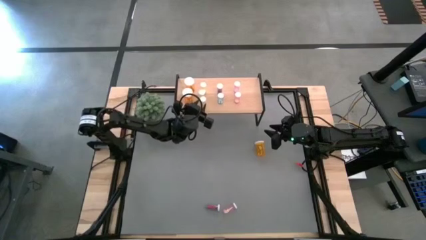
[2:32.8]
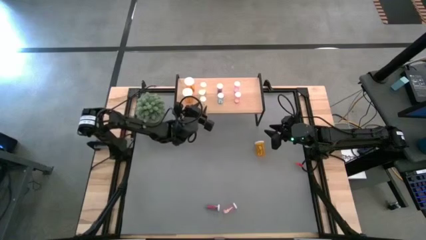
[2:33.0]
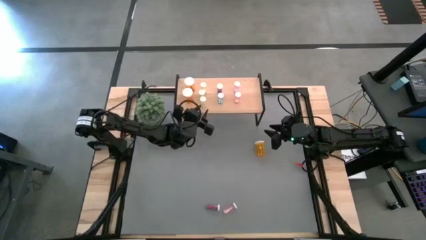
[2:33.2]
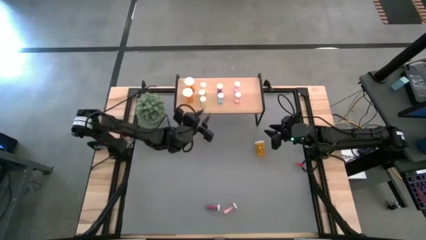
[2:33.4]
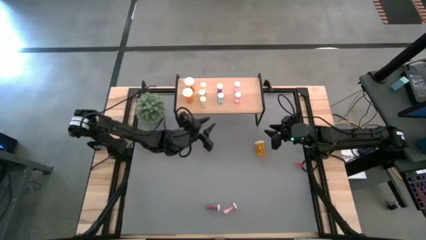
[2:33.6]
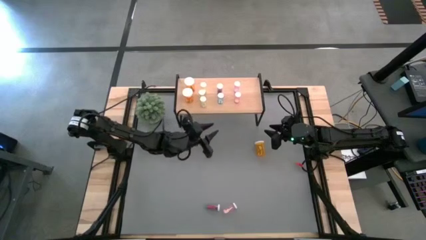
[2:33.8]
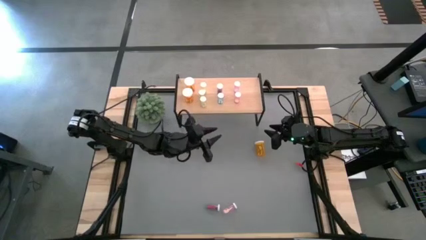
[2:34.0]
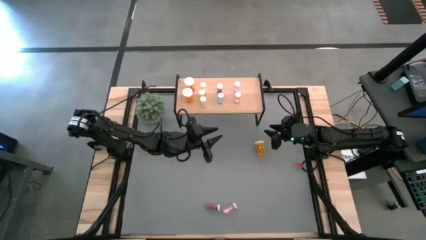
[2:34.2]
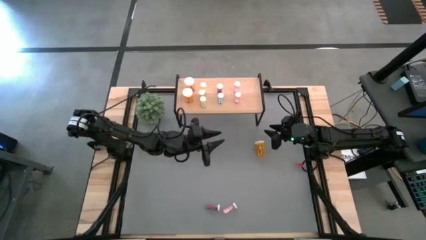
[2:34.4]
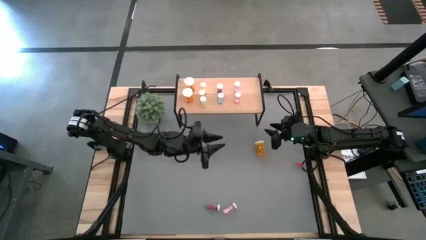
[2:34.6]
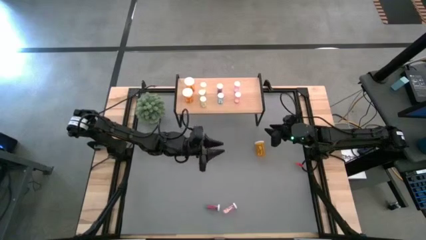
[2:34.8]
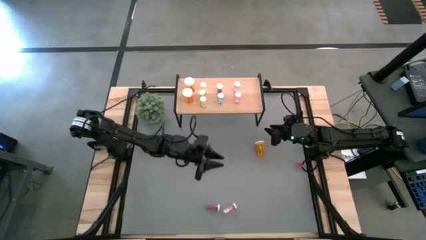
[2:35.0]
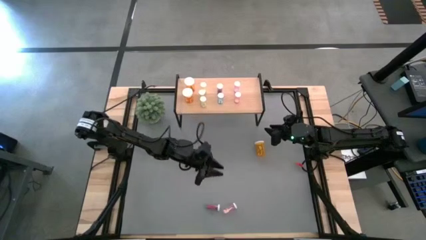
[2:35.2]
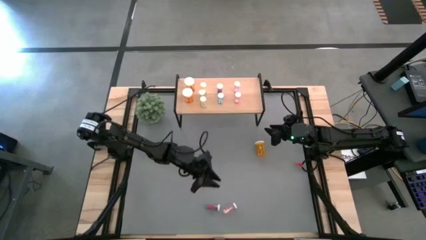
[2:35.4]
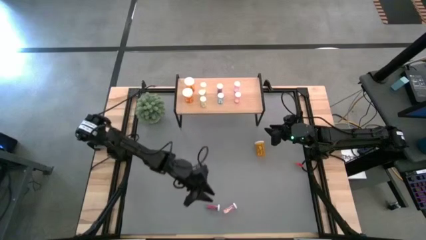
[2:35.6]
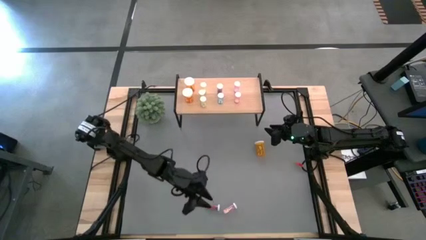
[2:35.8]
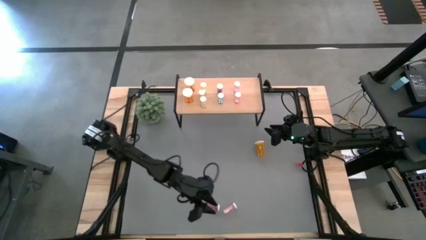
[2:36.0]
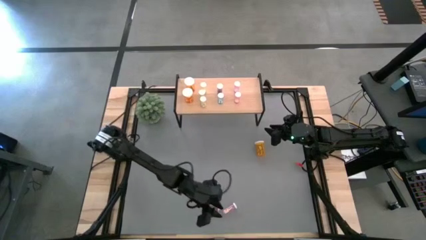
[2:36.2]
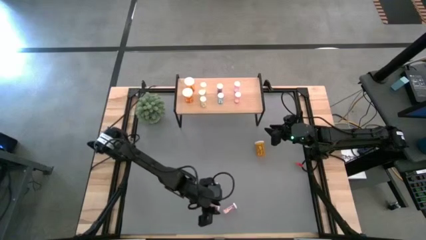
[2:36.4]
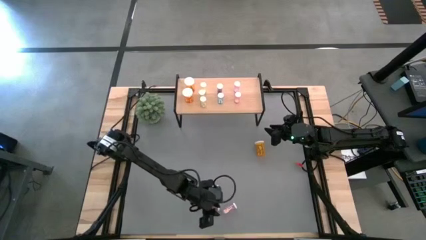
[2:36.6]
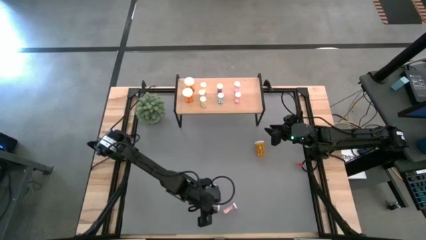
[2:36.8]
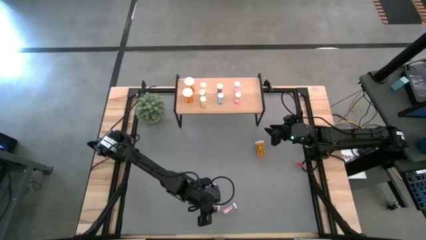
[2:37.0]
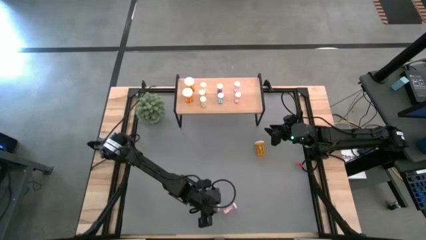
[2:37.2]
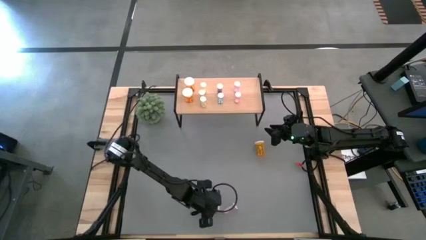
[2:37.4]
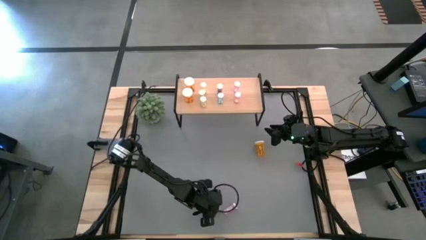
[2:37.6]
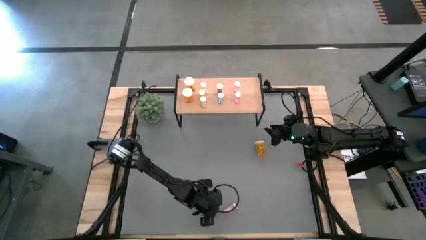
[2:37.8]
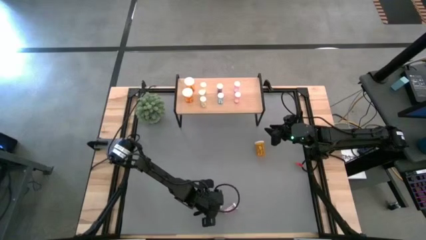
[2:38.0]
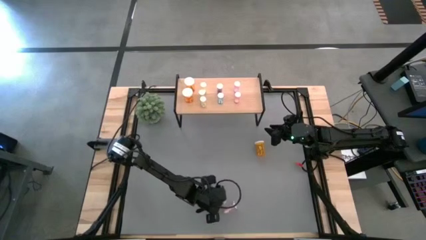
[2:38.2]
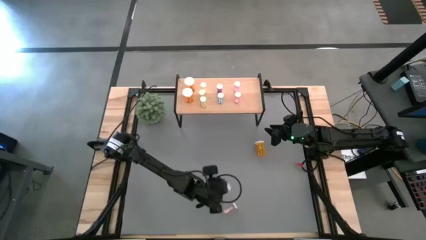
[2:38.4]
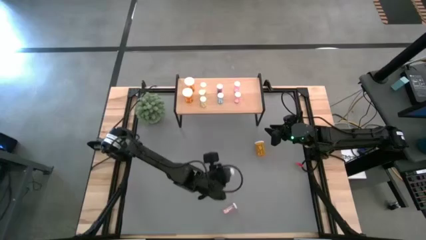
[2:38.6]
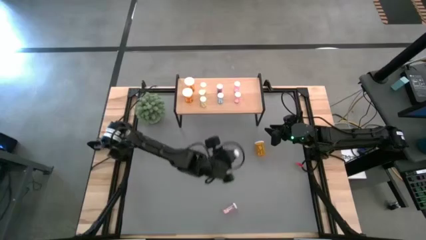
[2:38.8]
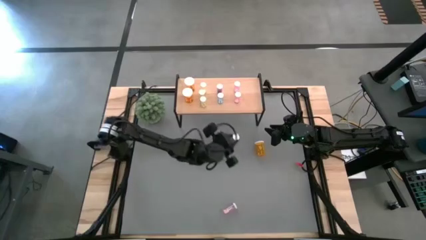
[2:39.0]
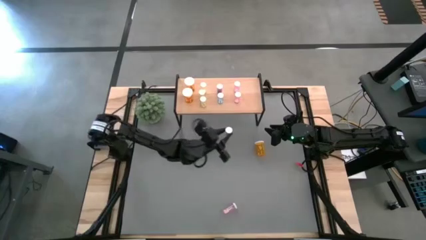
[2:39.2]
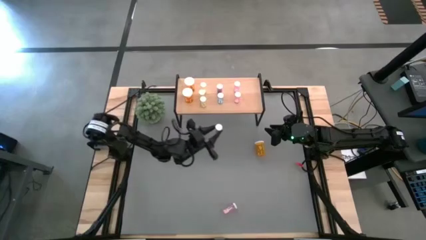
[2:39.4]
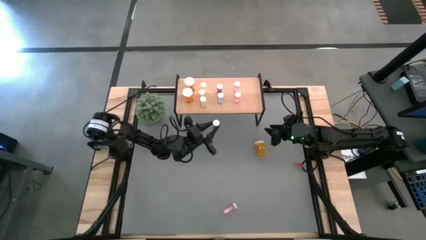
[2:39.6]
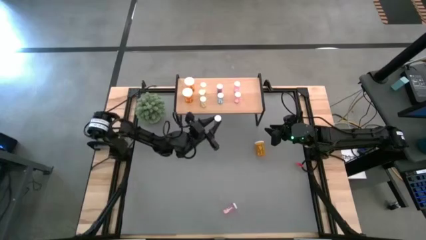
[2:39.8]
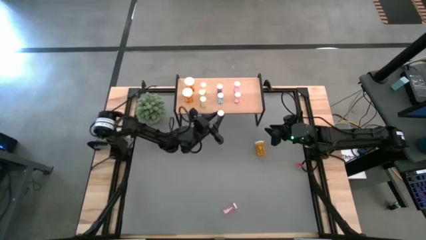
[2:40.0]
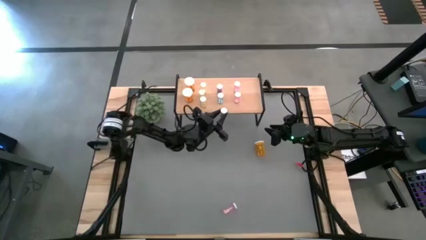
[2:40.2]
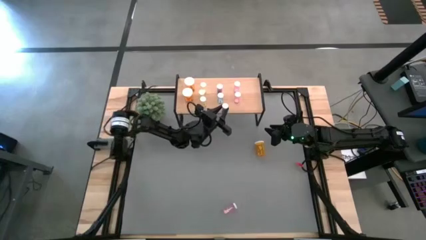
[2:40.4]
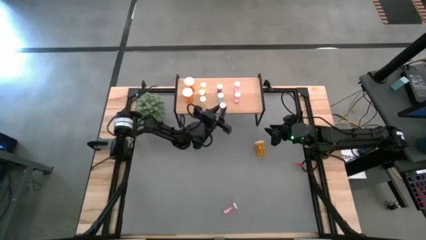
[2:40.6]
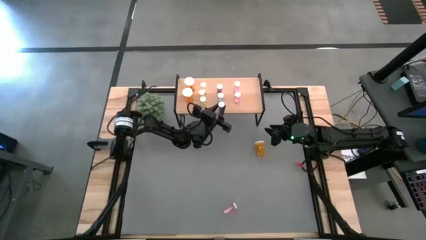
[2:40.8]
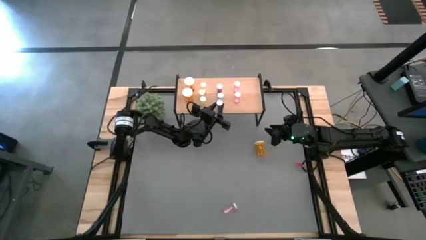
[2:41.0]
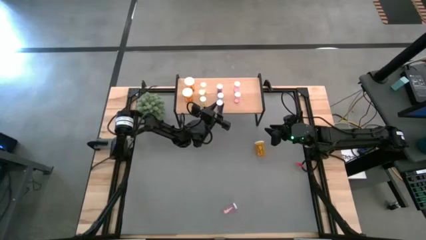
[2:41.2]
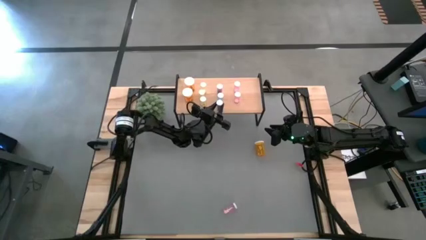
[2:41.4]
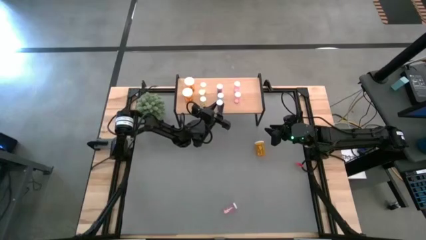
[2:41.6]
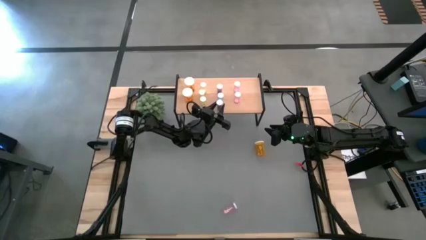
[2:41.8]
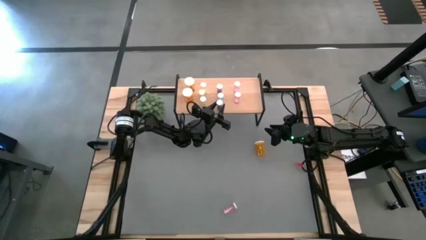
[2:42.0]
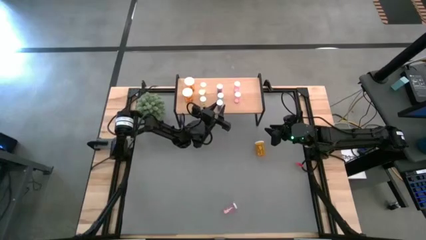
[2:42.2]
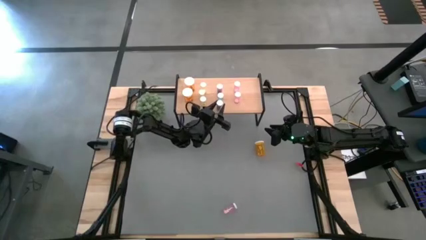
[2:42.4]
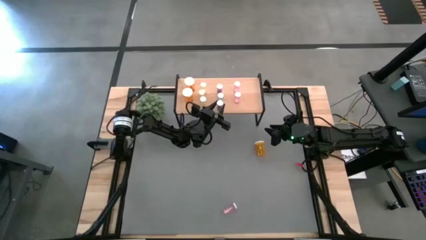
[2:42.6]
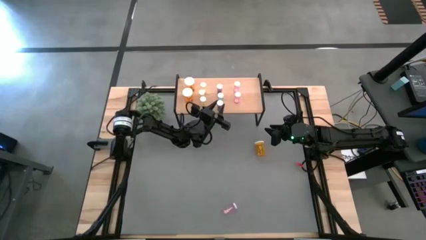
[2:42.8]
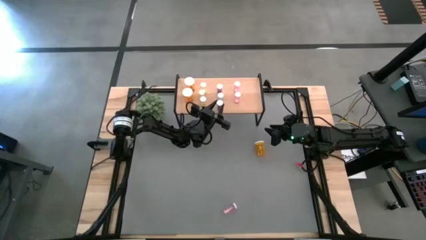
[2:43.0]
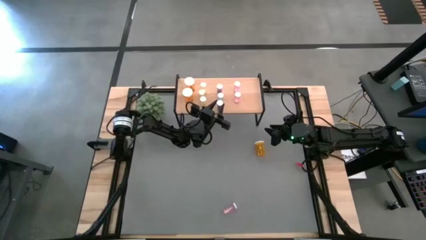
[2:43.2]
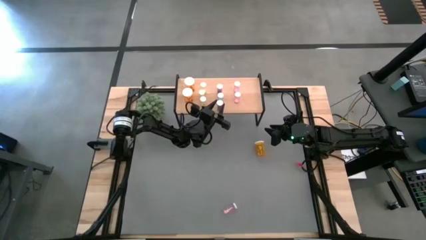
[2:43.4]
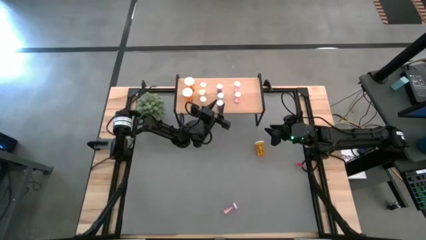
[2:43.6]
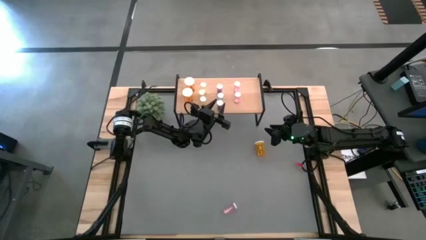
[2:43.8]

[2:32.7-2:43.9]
Task: Pick and place medicine bottles onto shelf by color
Put the blue pill bottle on the shelf aligned with the other blue pill bottles

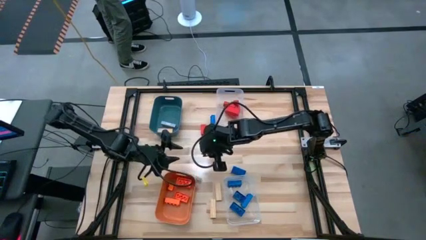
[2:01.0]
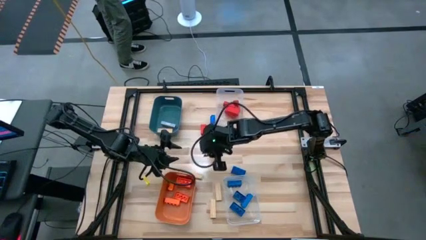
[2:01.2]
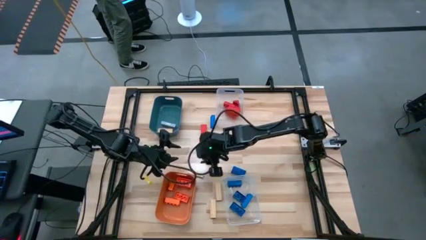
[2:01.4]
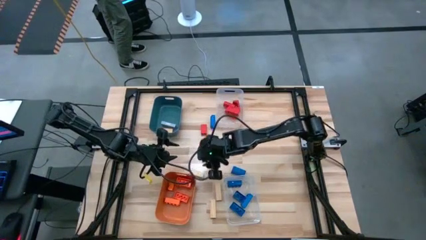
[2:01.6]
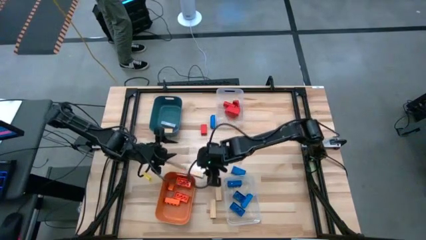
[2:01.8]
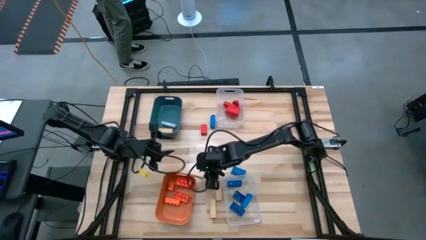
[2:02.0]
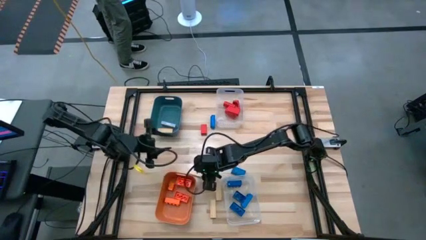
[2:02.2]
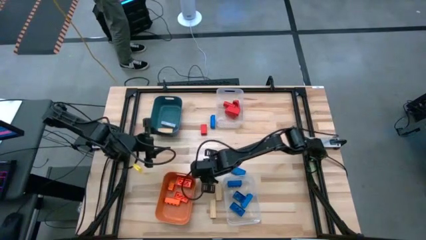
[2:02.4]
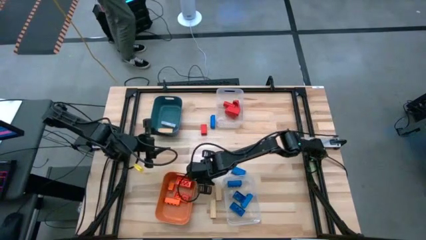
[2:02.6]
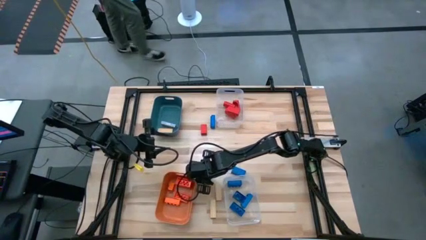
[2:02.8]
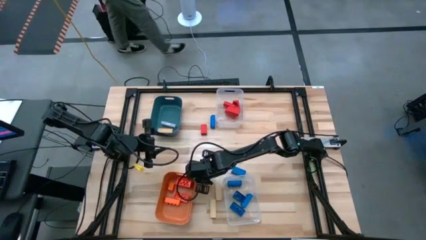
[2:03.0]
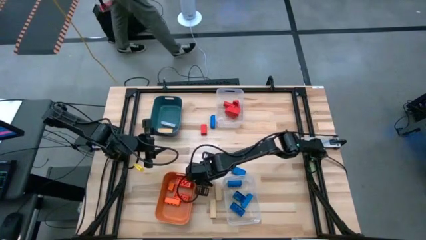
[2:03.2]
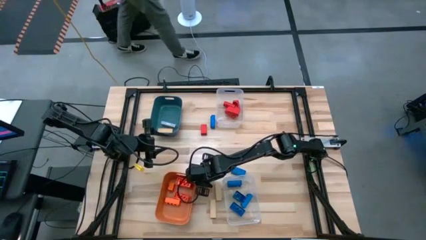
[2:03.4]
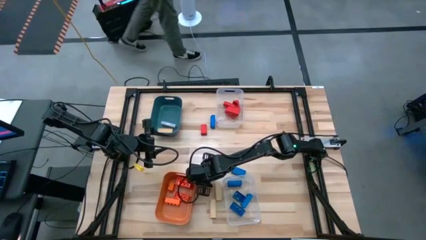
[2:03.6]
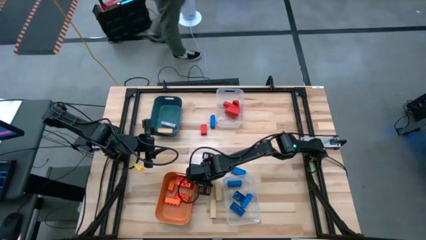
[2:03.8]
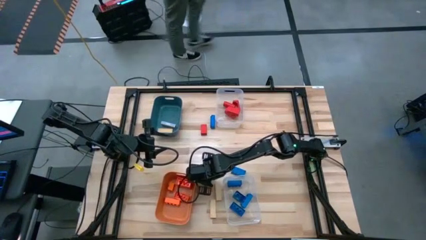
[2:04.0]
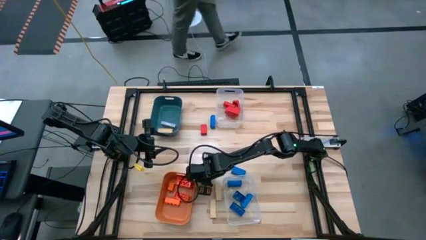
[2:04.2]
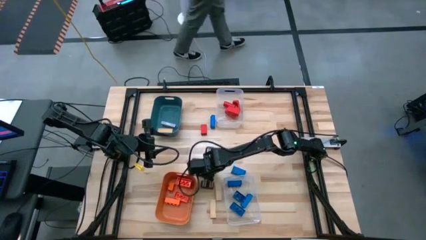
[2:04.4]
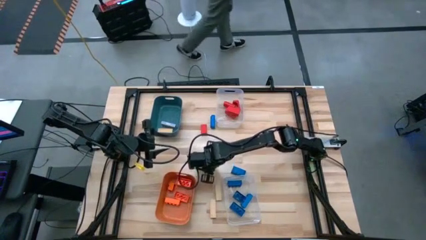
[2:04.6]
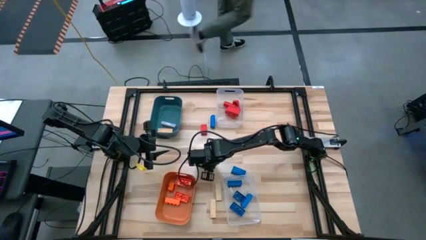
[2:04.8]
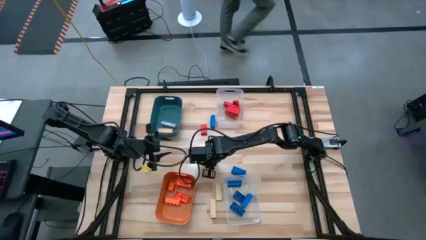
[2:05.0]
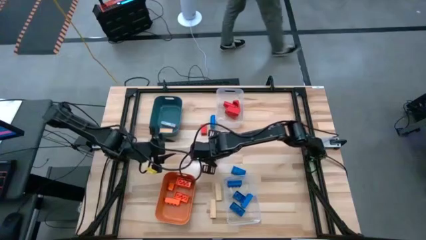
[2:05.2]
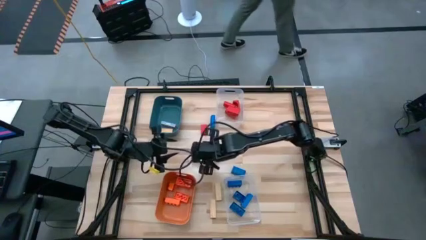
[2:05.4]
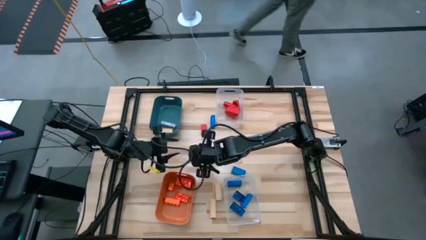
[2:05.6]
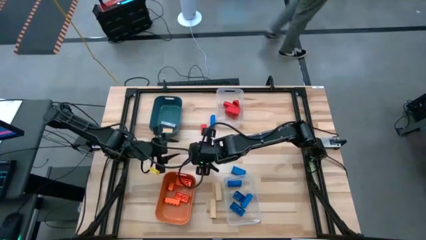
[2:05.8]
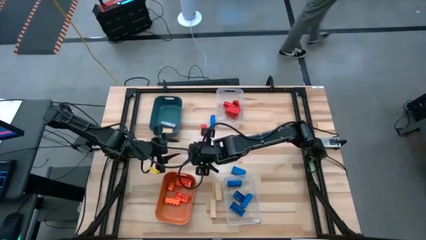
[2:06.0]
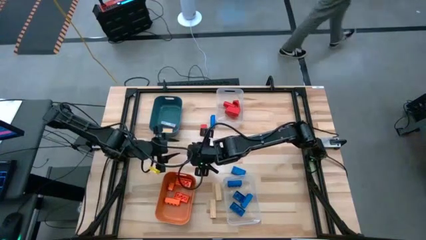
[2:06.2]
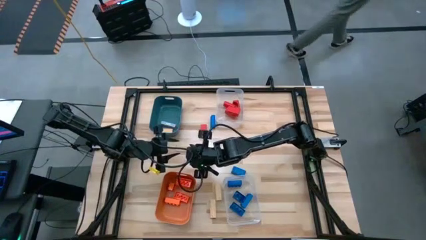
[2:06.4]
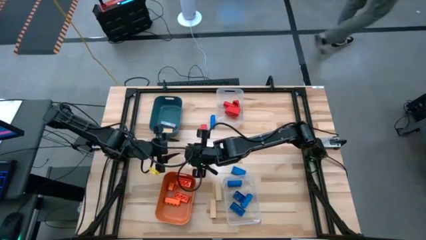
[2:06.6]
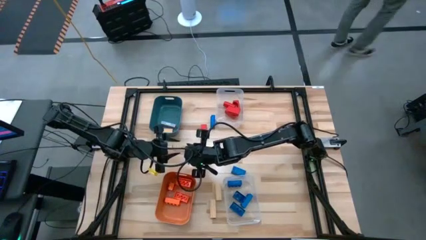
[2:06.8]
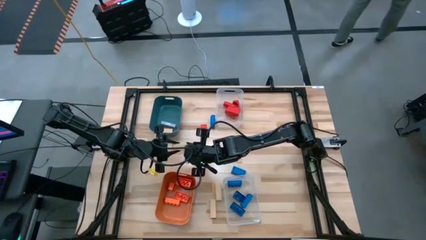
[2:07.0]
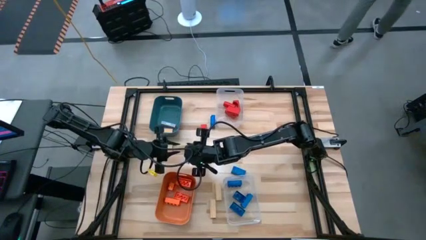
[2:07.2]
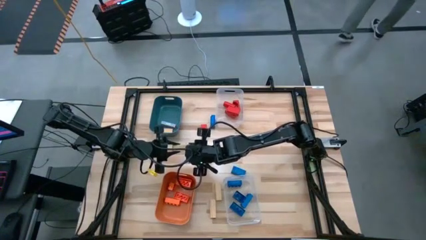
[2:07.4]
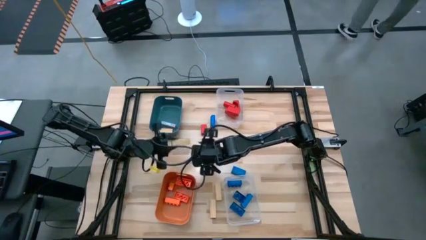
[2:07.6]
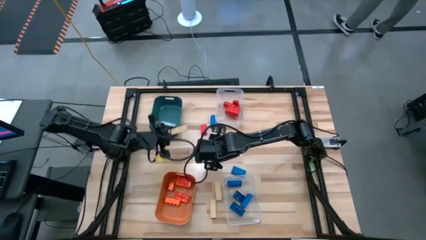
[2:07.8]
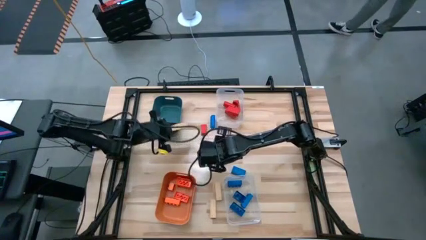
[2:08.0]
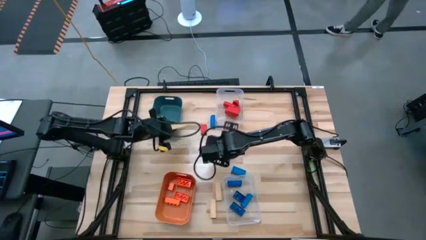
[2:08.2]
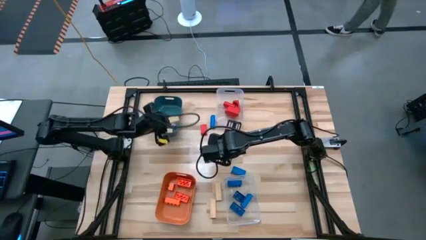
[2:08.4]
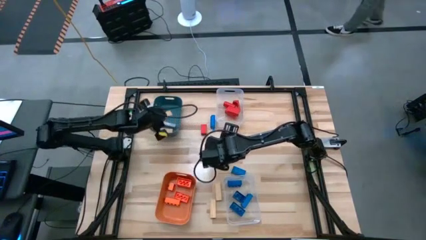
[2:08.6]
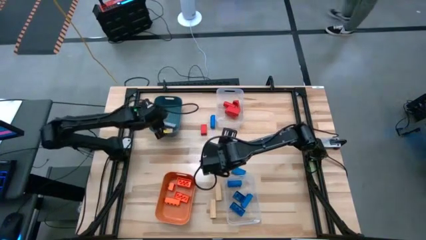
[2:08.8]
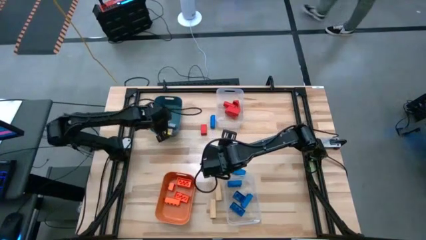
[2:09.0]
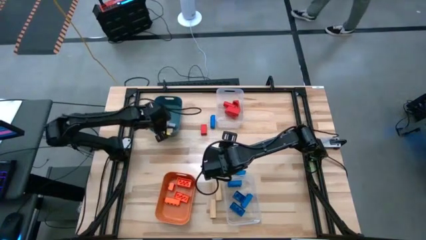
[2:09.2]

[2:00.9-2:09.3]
Task: Sort blocks
Put the brown wooden block into the blue bin
